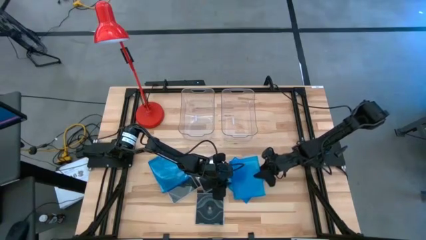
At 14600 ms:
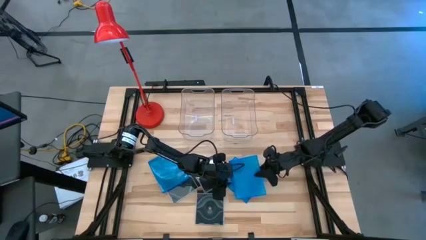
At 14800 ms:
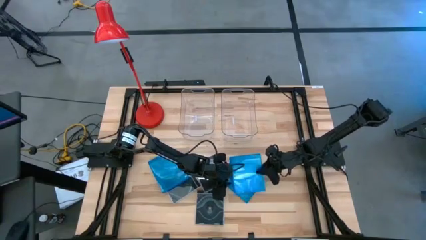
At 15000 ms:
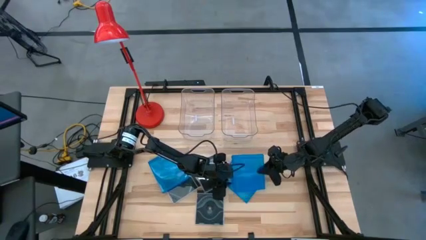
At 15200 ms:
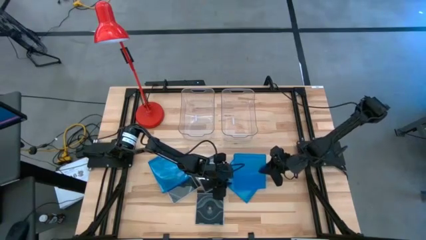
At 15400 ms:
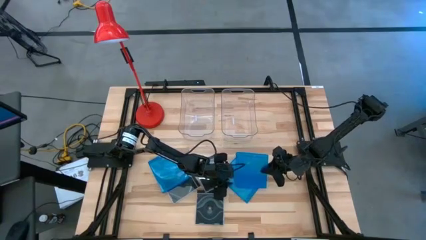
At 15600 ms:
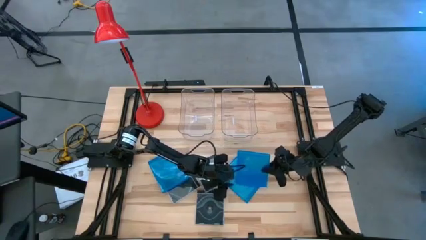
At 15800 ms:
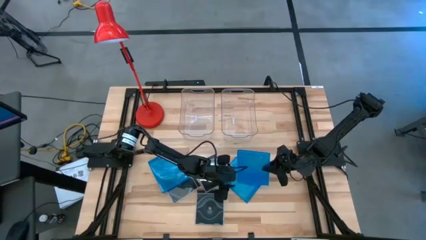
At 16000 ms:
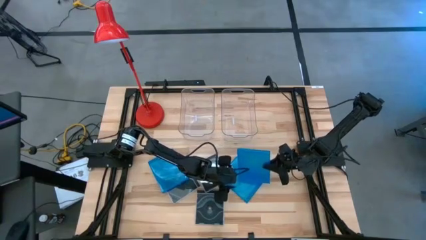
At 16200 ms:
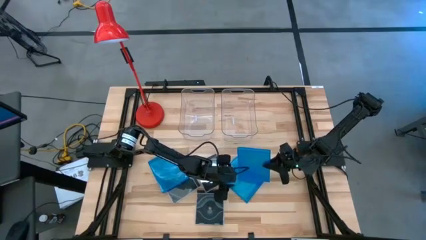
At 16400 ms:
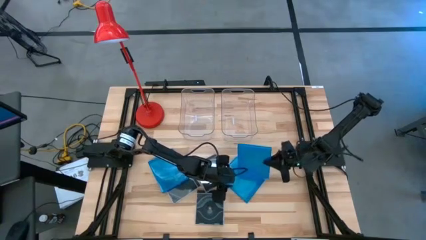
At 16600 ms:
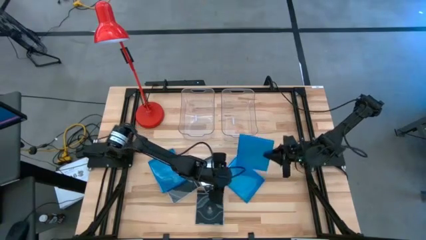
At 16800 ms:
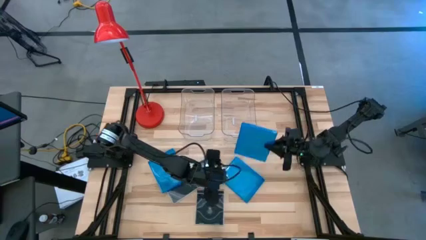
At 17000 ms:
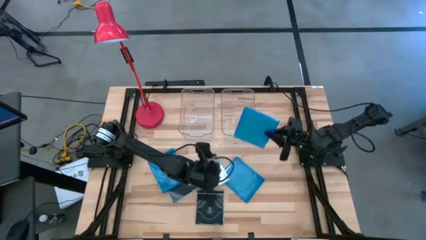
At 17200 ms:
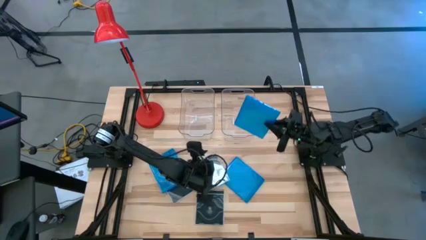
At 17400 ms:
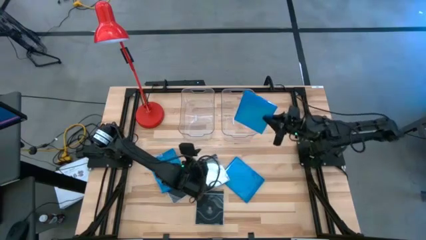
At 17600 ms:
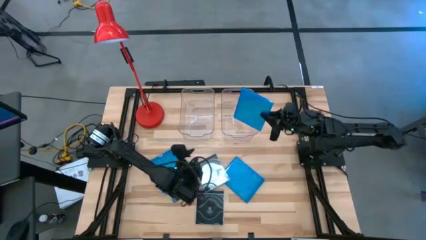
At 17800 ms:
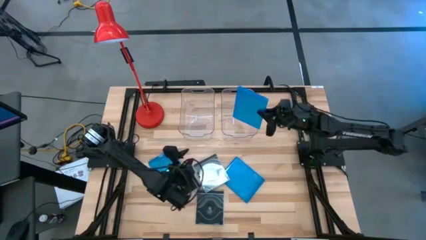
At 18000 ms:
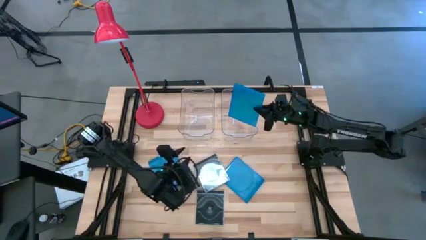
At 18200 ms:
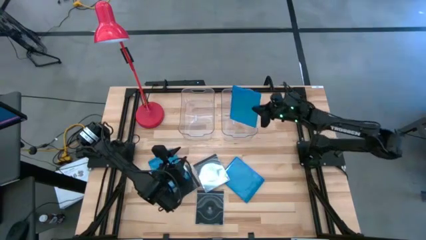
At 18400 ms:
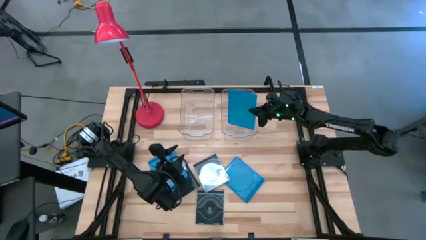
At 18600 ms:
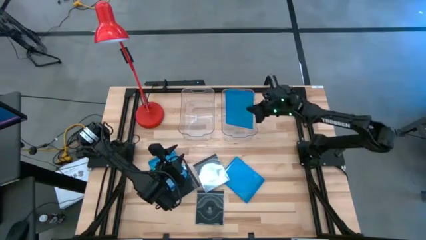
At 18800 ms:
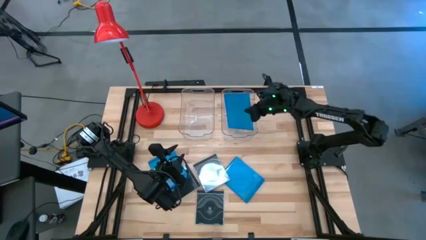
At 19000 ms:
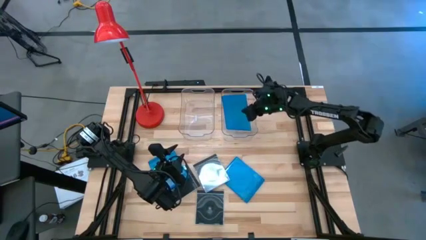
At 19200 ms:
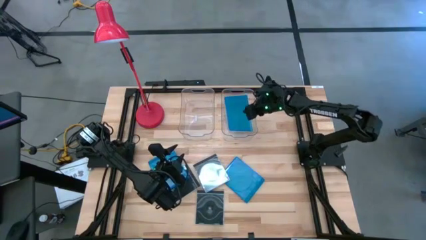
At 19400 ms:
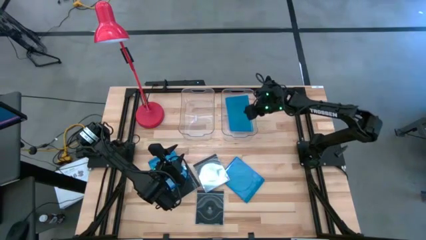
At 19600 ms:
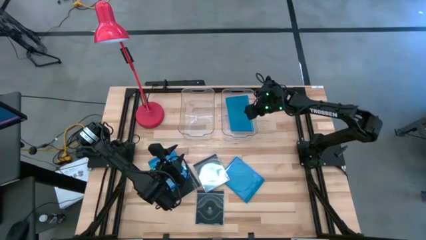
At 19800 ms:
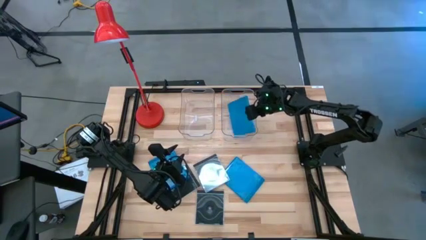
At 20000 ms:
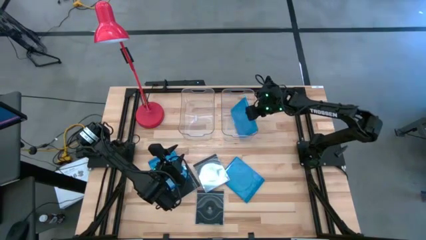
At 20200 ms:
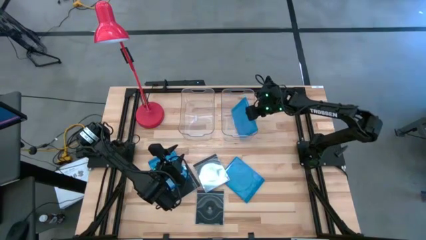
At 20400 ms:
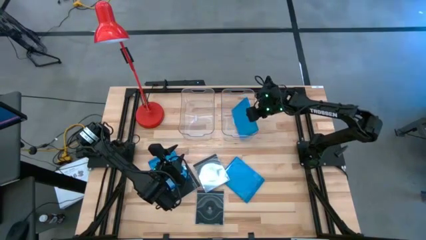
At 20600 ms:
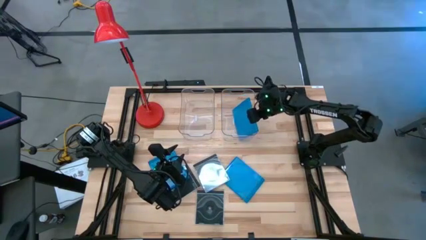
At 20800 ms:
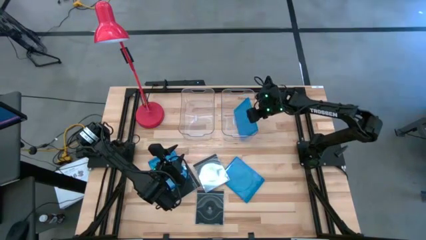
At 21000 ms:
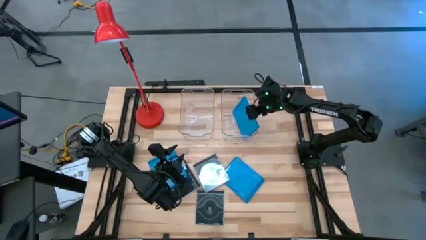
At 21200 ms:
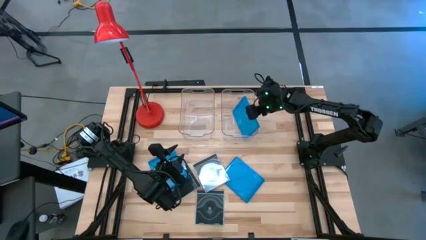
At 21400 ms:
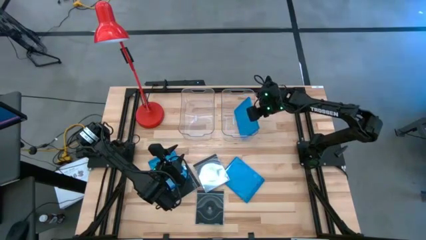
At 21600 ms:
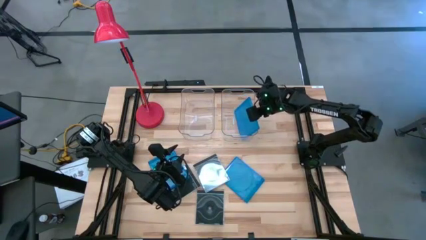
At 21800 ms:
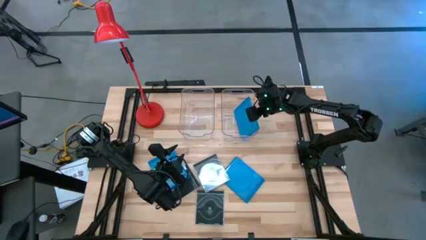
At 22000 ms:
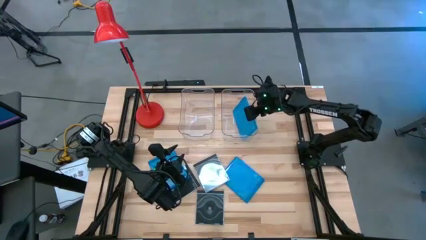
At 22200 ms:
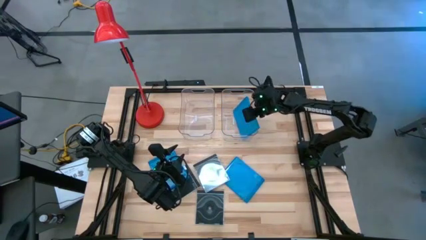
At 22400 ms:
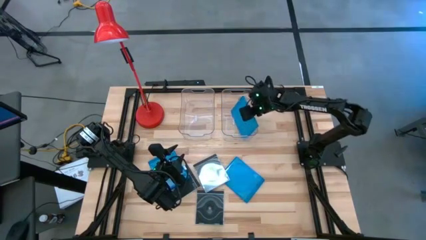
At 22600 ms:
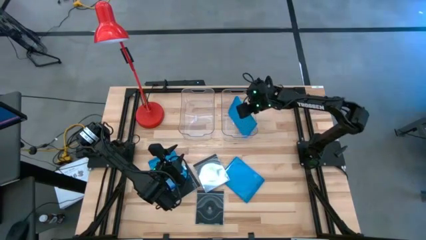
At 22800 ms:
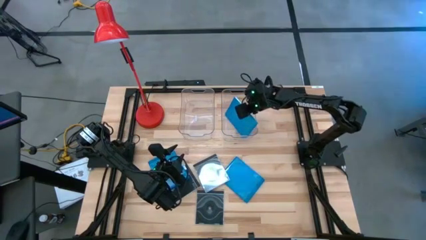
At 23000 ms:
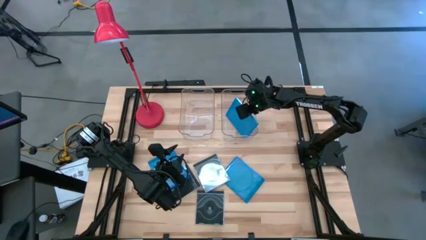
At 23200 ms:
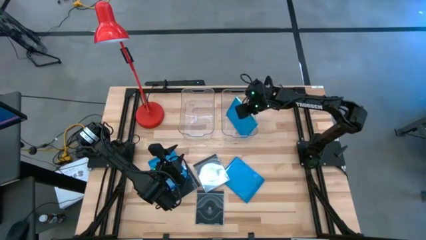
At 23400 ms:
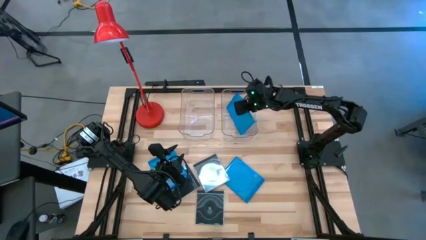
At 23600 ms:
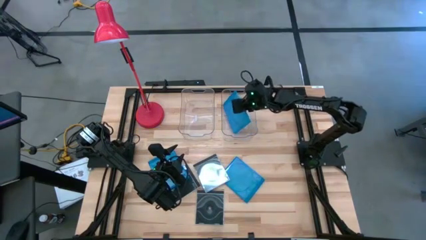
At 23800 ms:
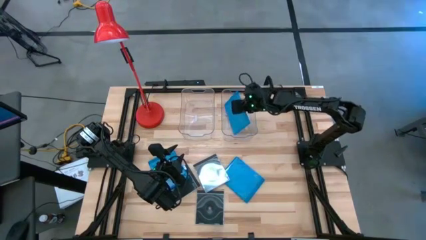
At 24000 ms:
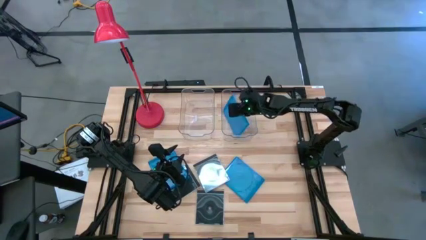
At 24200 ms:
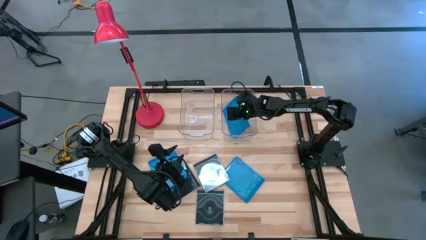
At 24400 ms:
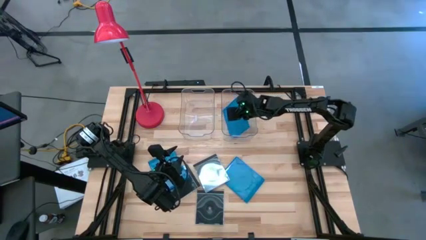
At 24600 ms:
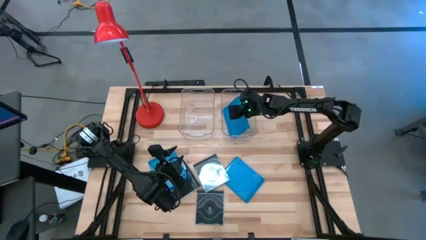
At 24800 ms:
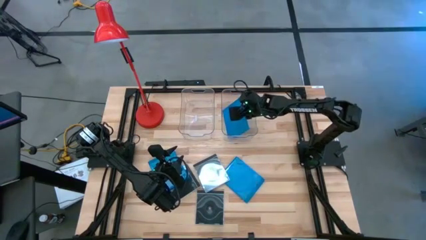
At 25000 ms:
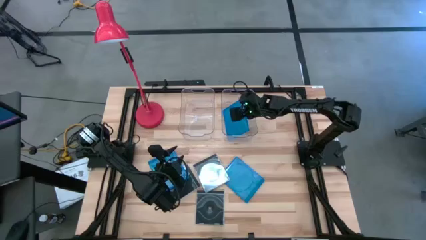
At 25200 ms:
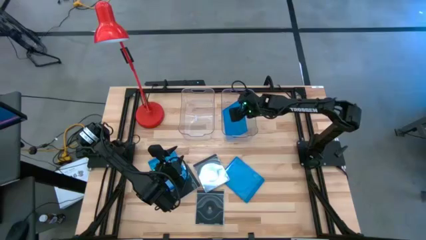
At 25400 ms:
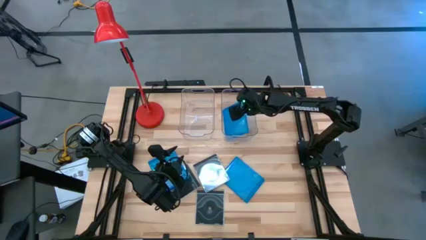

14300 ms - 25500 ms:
Task: Pick & place jewel cases by type
Put the right blue cd case into the right transparent bin

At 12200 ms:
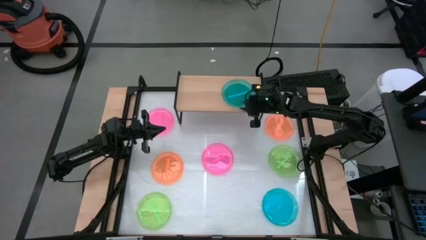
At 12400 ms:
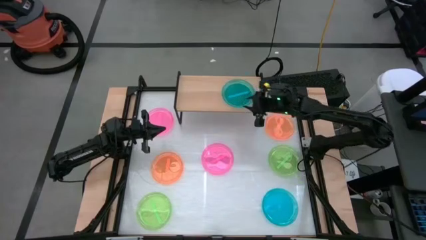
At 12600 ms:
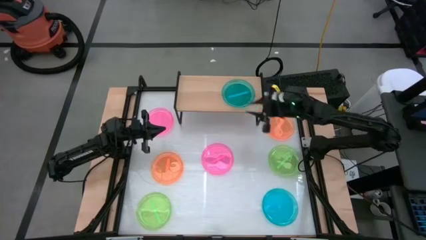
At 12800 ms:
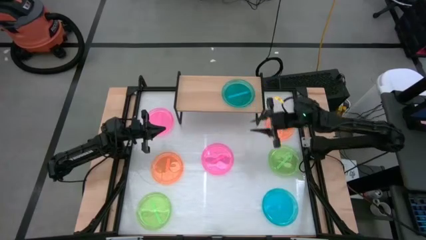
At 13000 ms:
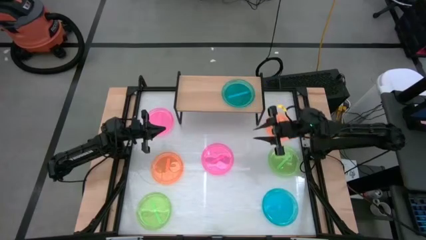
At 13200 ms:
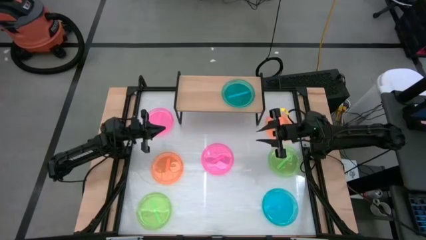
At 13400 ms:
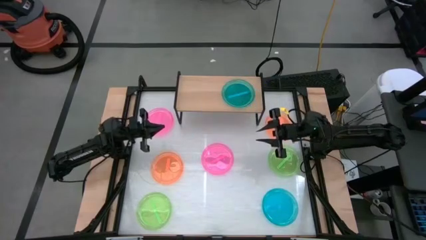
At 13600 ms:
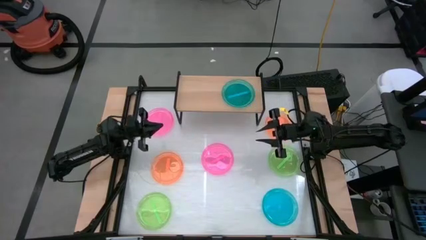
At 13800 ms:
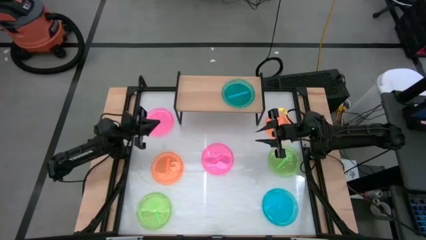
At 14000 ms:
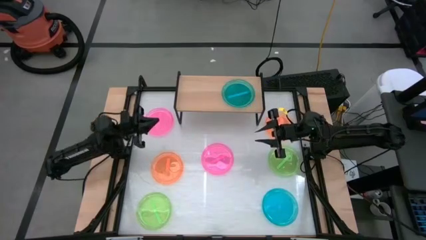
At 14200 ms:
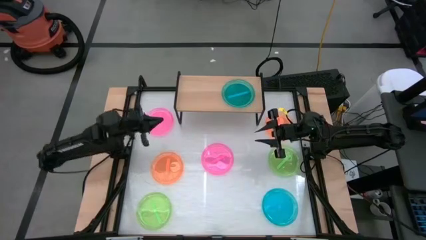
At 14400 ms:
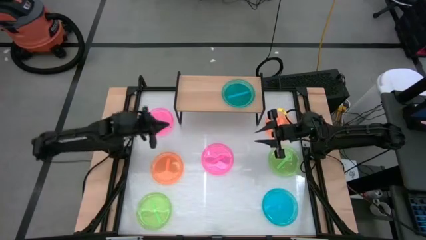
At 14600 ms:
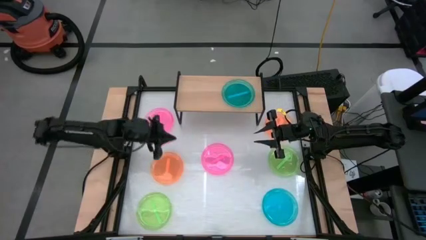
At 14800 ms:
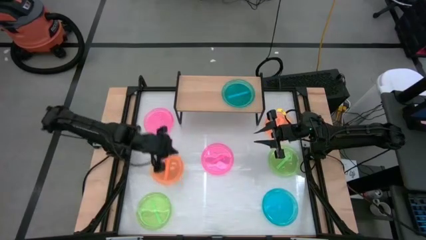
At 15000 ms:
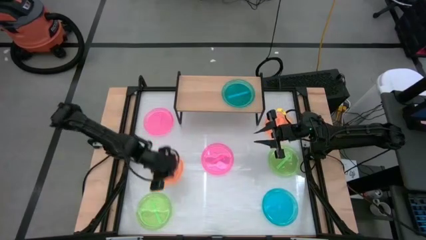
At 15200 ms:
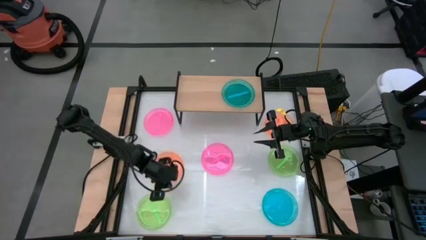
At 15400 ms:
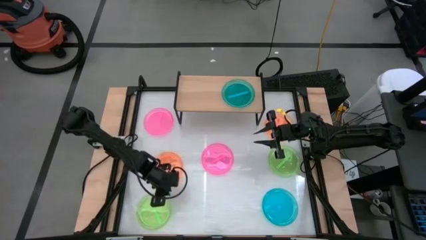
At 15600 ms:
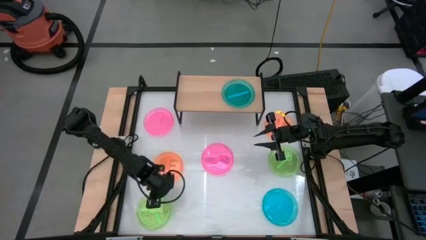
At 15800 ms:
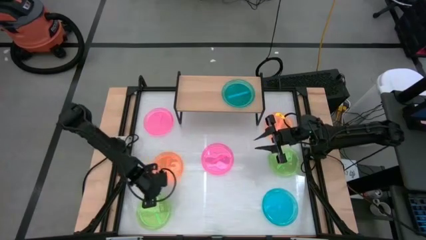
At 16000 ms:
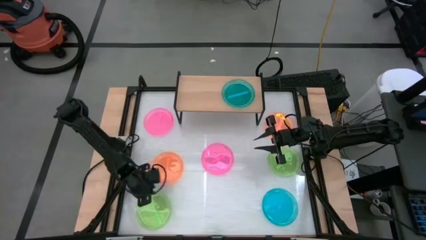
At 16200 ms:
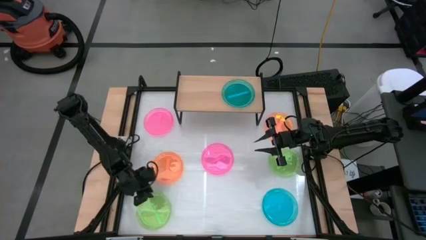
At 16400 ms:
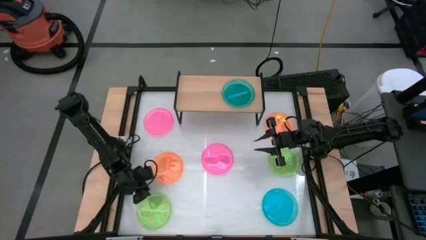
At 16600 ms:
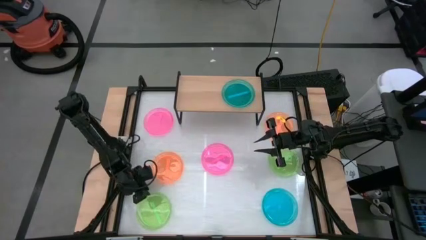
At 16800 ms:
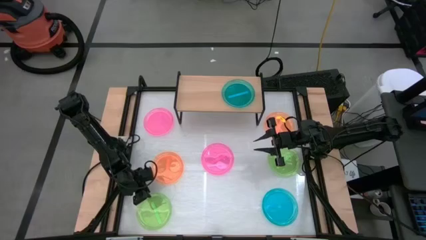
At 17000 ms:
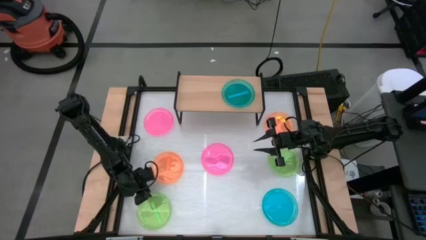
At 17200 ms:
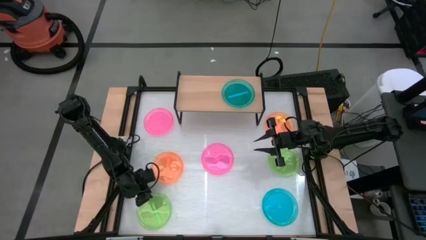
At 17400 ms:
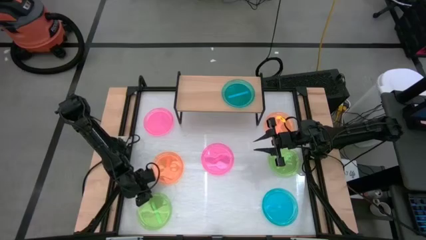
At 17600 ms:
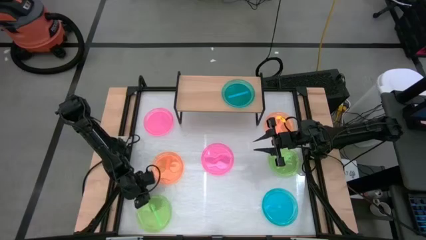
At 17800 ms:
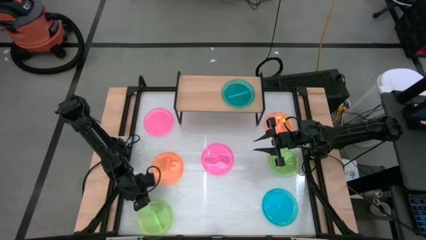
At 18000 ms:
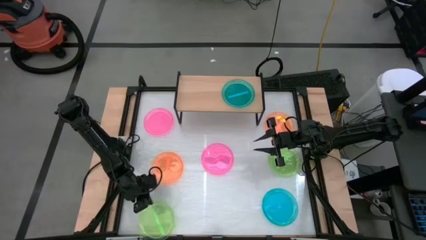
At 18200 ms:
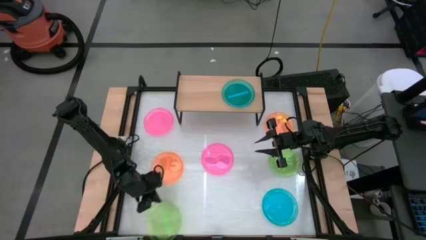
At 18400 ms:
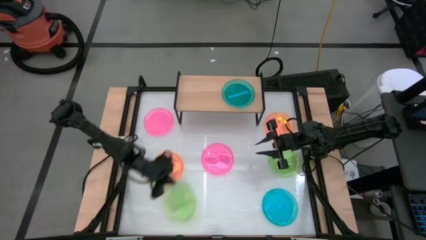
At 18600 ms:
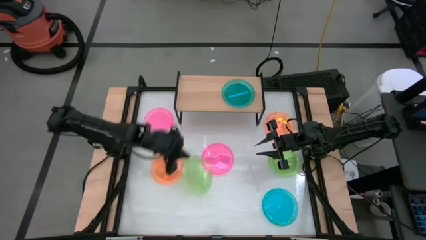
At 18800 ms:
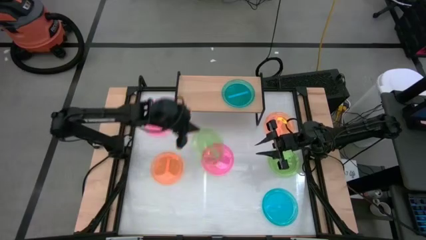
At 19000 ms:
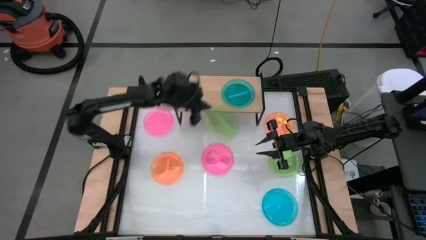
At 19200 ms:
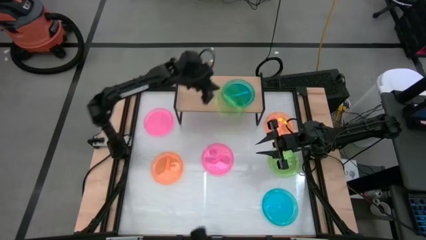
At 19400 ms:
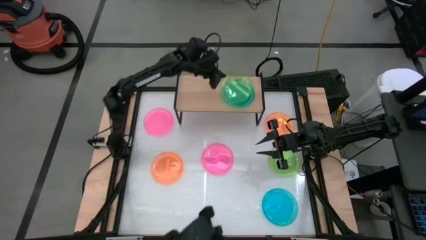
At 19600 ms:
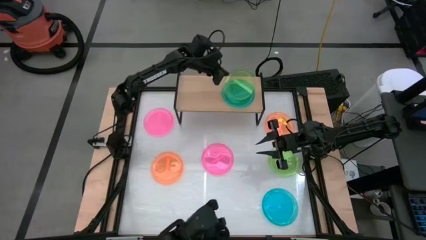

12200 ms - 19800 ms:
Task: Place and stack plates onto a shelf
Stack the bottom green plate on top of the blue plate on the shelf
